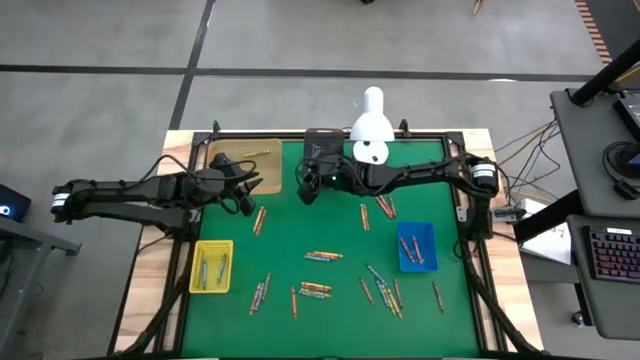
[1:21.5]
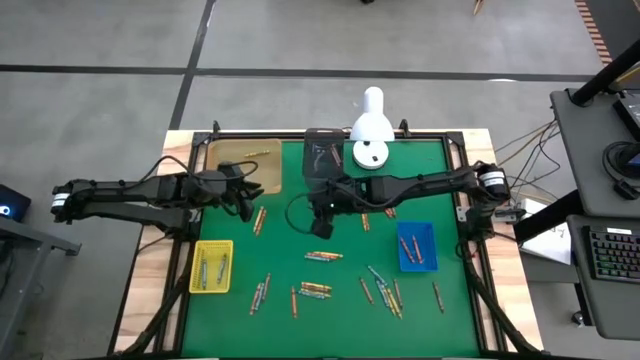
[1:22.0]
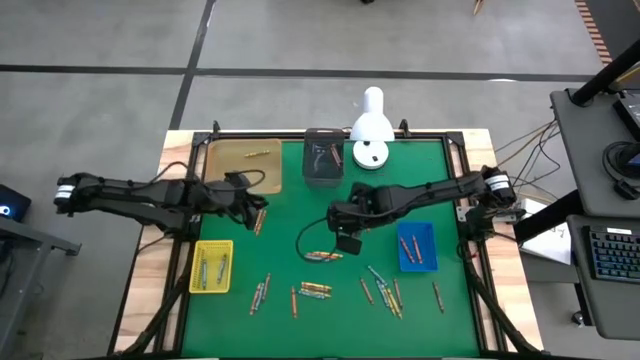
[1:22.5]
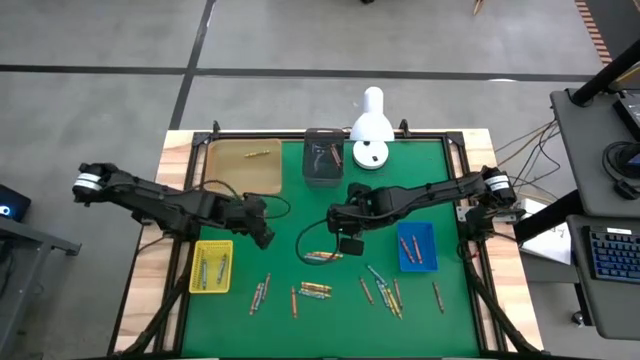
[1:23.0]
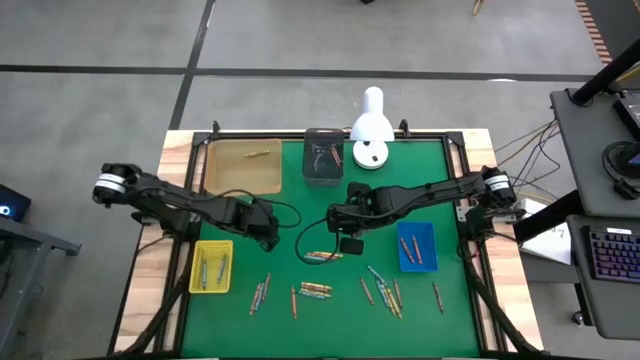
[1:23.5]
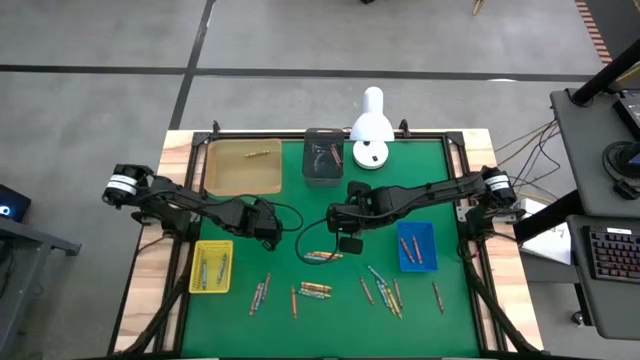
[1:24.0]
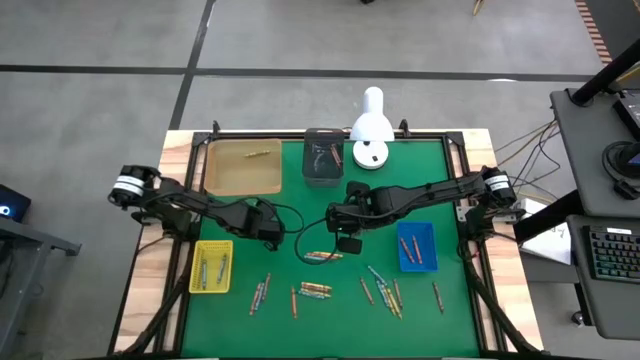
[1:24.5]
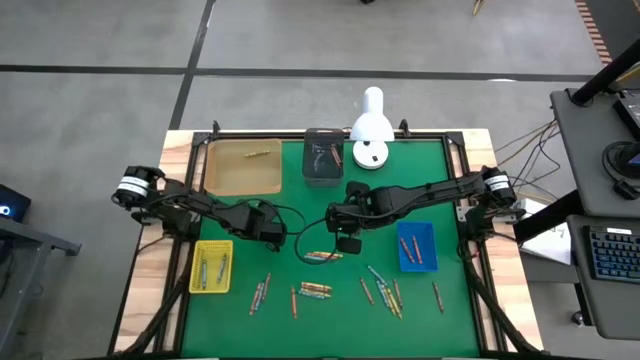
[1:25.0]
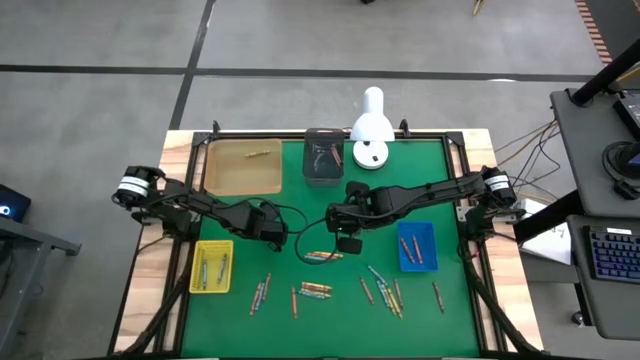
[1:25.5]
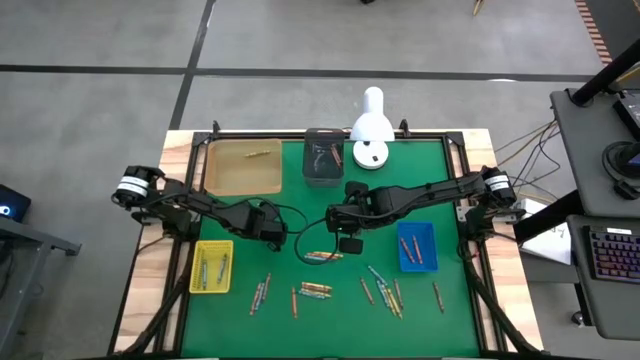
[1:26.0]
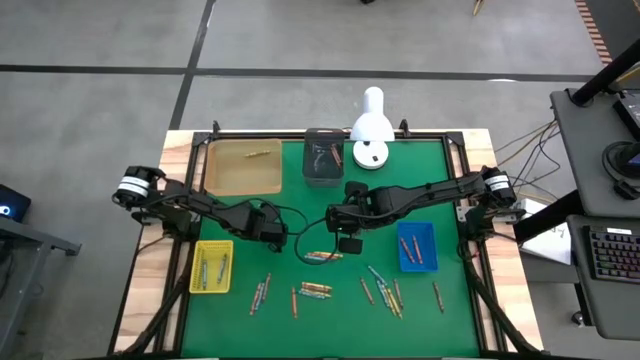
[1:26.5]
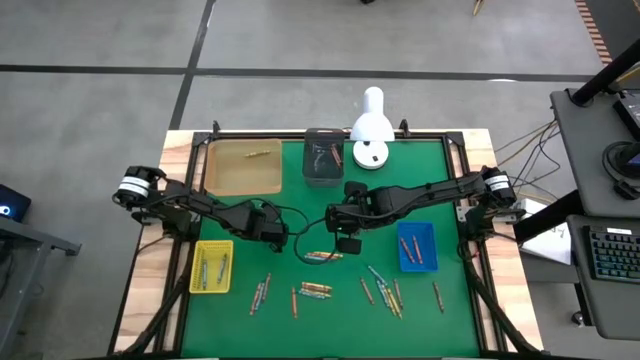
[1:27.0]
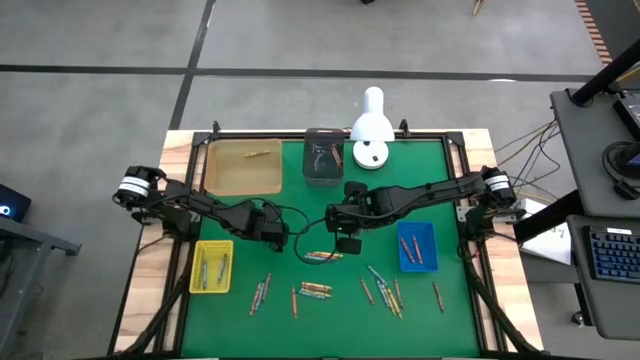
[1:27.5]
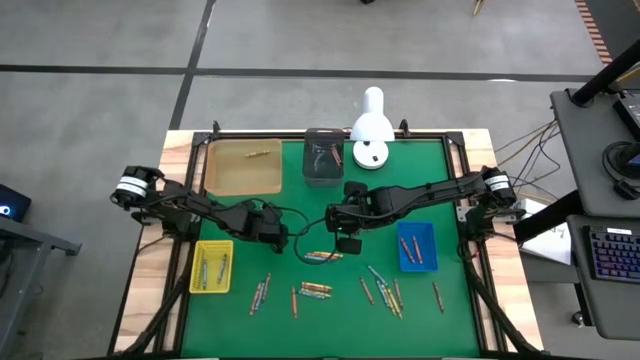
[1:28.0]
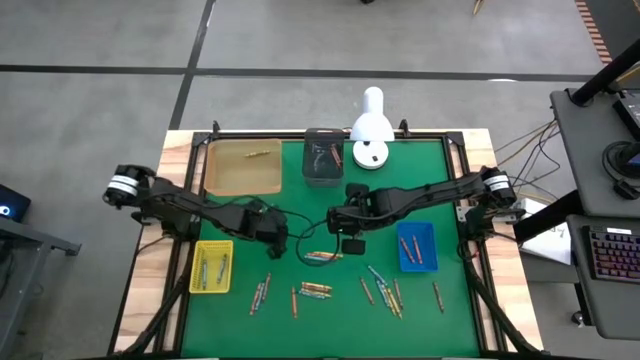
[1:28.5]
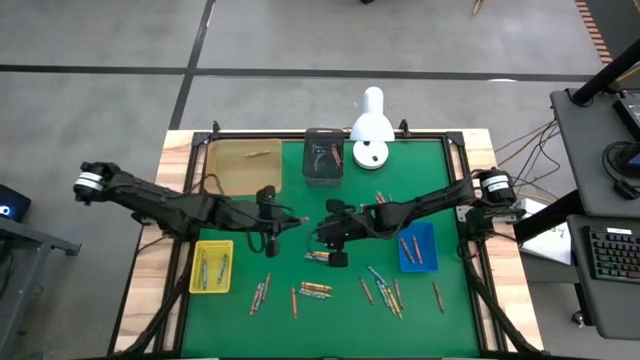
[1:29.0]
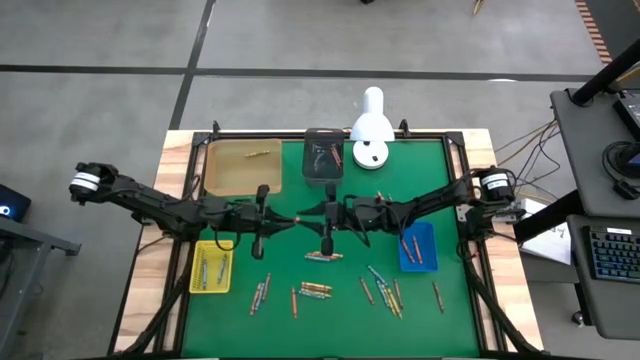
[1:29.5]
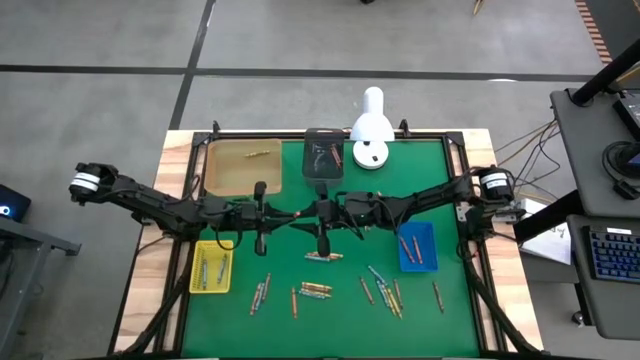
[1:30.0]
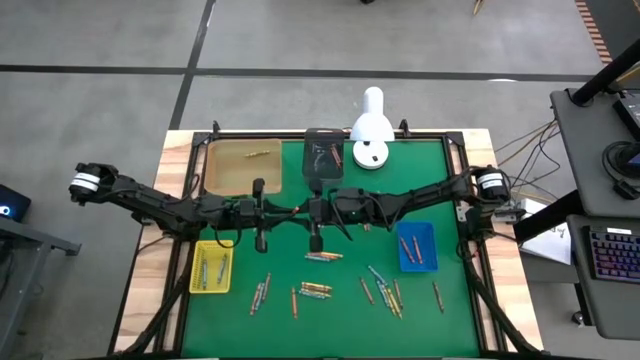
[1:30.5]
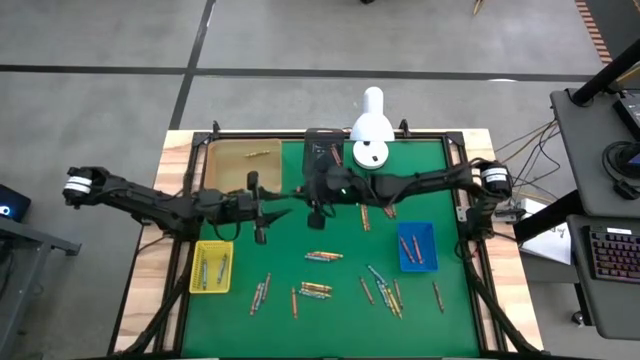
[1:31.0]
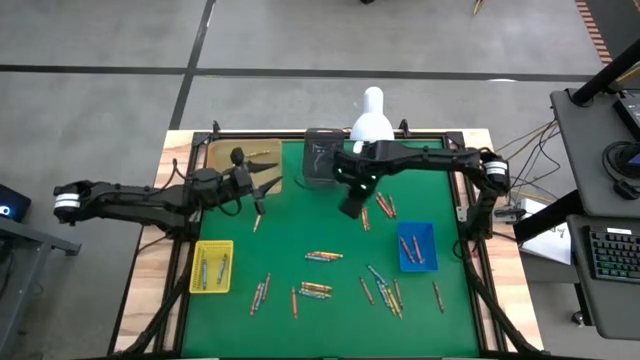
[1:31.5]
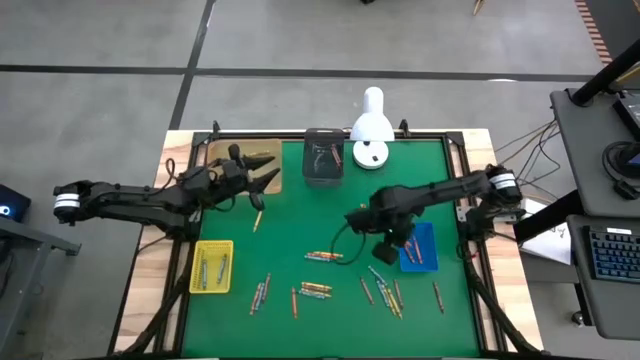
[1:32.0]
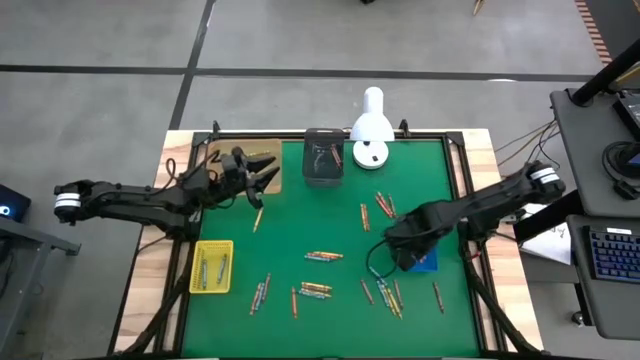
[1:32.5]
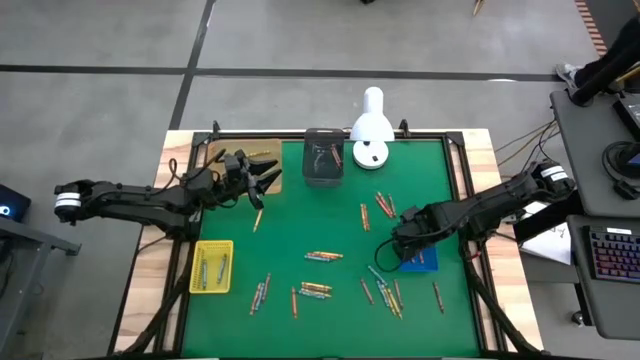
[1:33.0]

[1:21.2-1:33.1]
Task: Sort crayons
Put the orange crayon into the blue bin

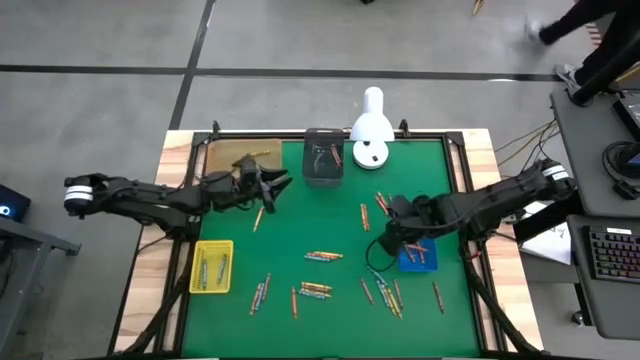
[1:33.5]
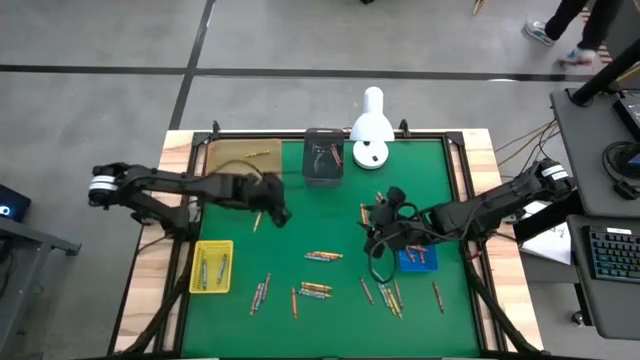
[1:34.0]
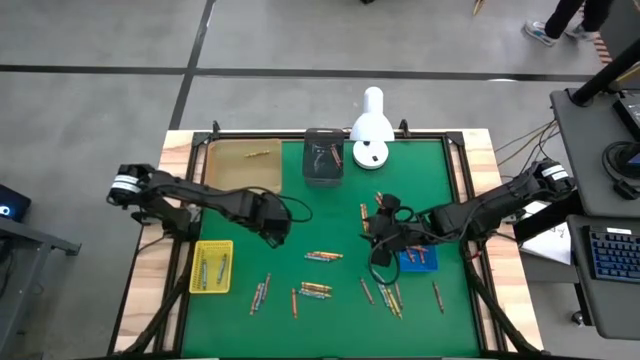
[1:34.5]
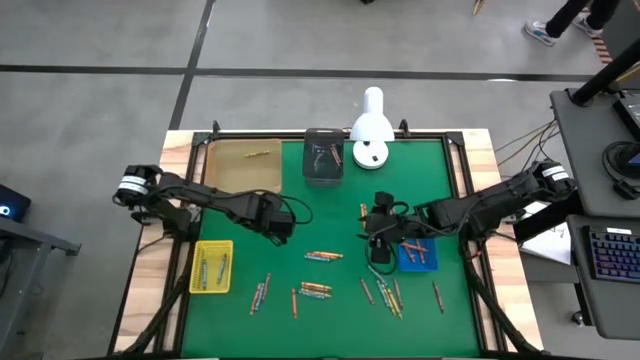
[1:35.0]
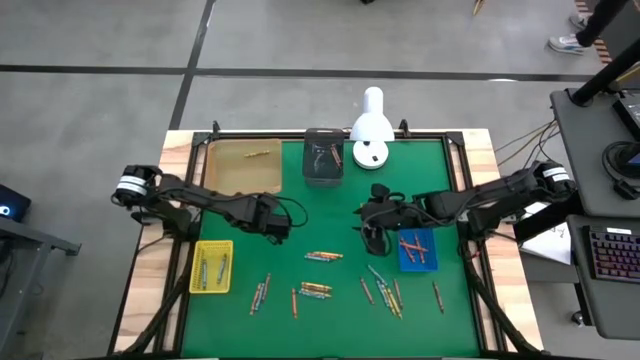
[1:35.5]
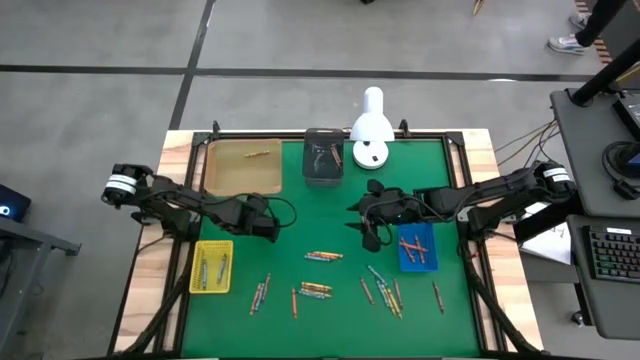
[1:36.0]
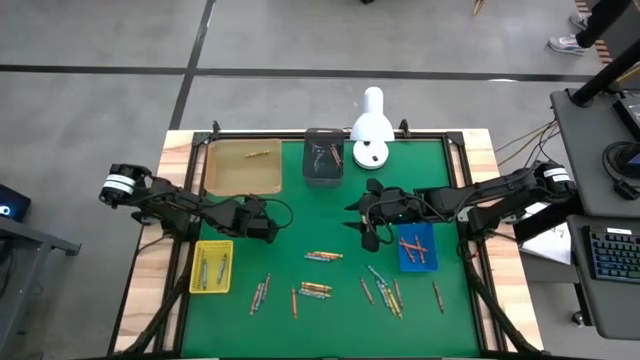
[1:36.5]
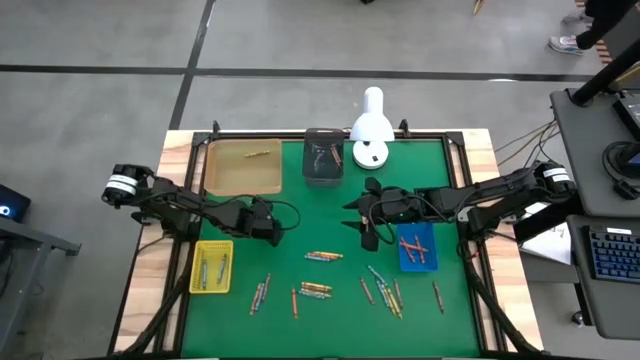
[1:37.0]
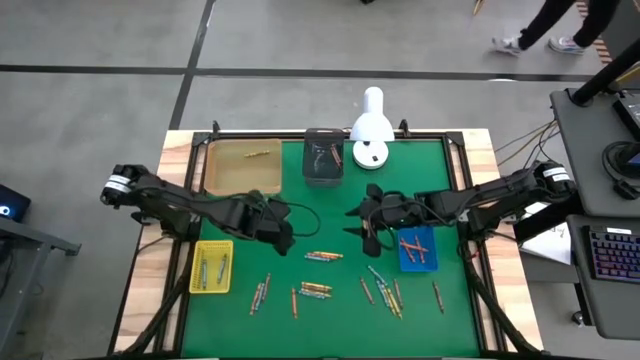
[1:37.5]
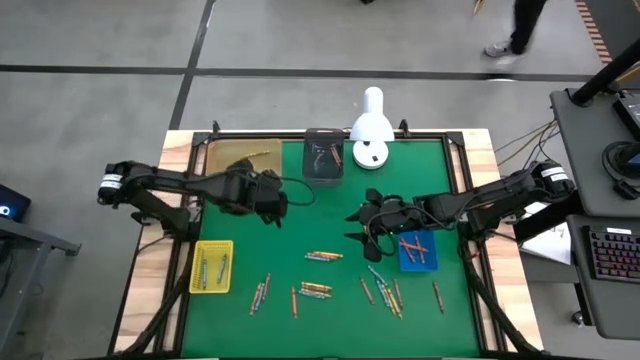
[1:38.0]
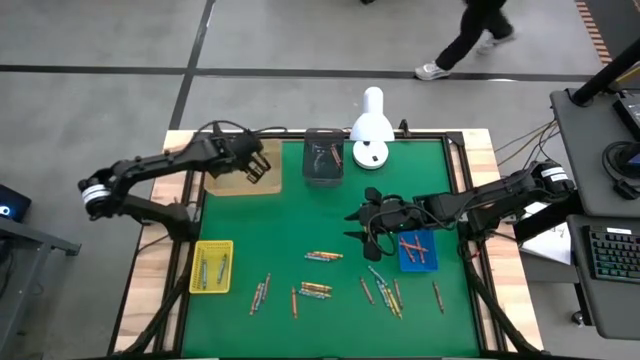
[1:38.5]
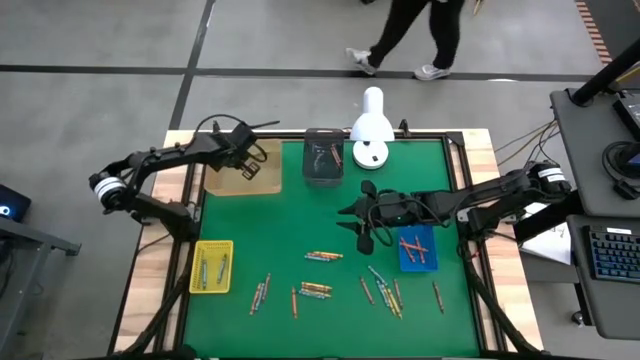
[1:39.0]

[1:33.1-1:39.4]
Put the green crayon into the orange bin

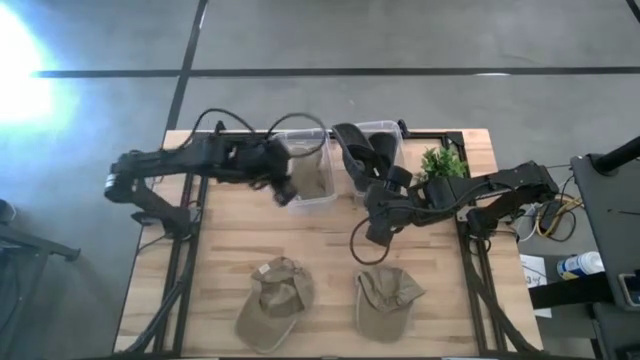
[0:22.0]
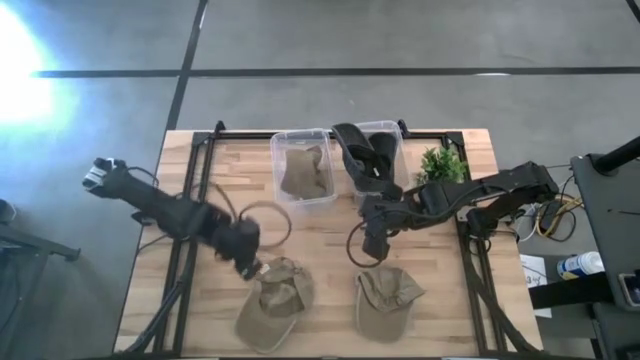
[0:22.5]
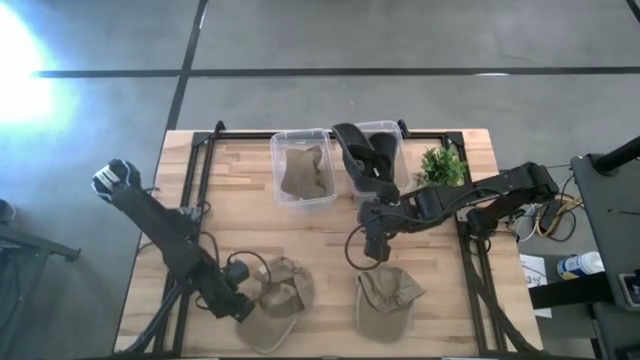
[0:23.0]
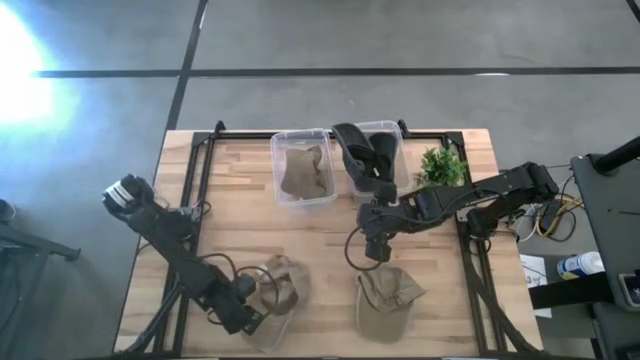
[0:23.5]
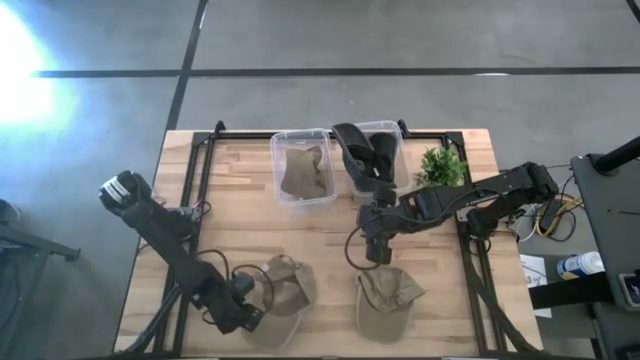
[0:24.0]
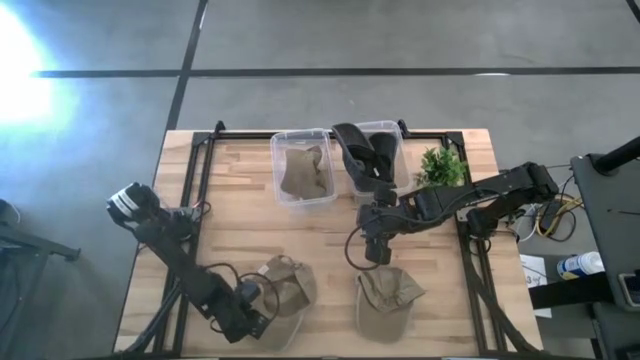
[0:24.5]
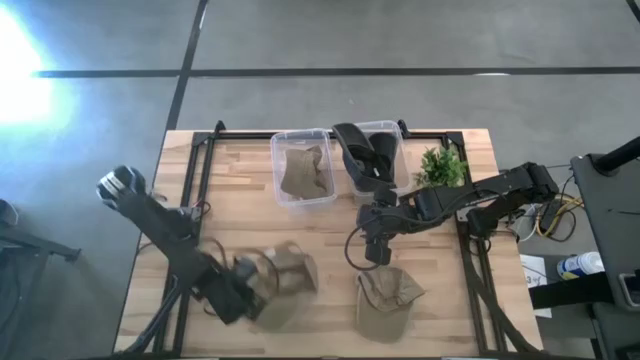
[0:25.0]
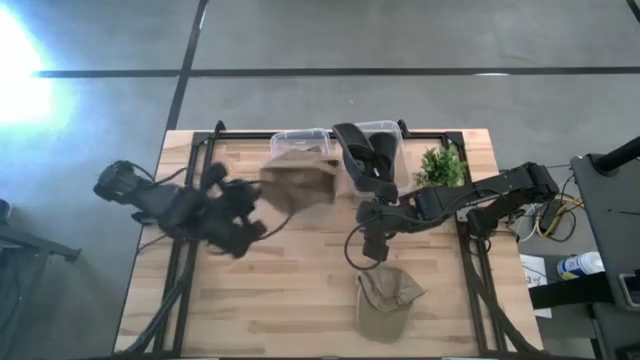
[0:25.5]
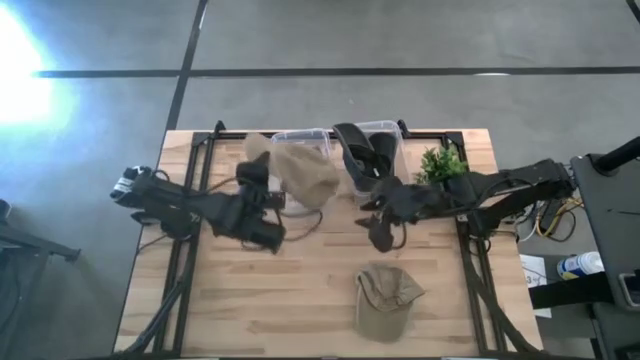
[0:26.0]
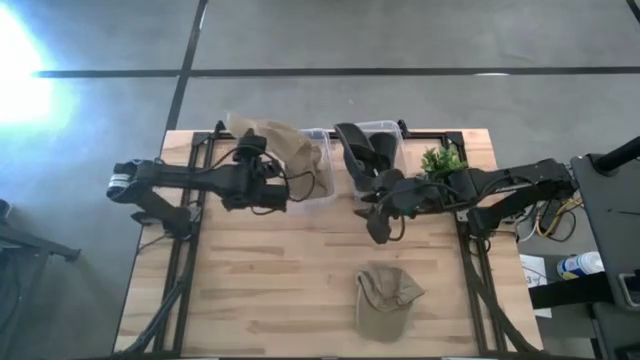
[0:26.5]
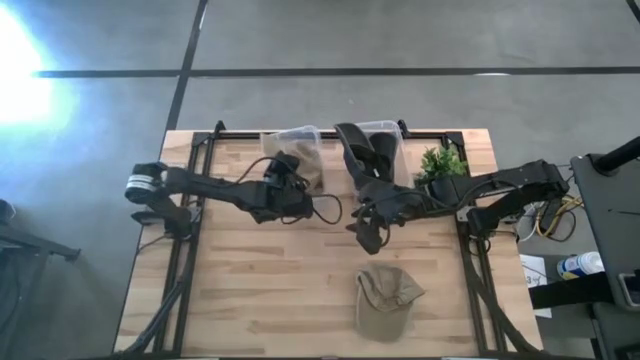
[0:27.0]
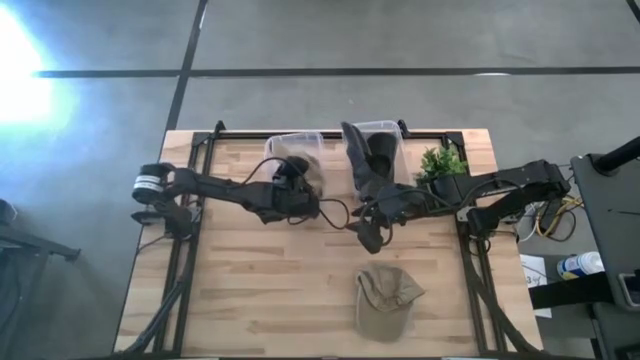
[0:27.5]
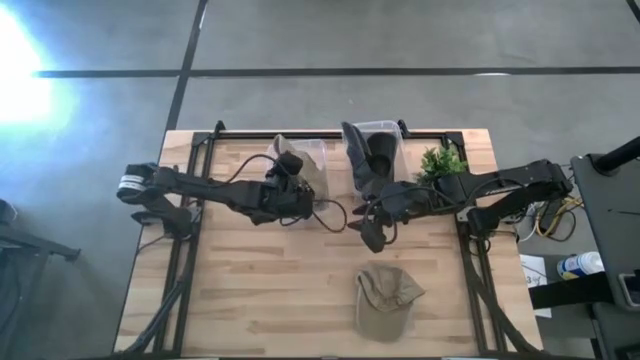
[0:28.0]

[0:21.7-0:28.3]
Task: Pick & Place hat
Put the left brown cap into the left transparent bin
